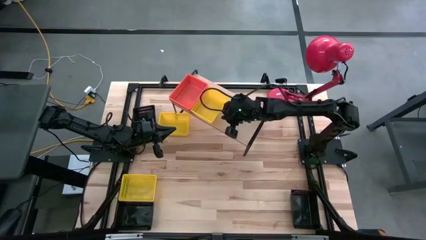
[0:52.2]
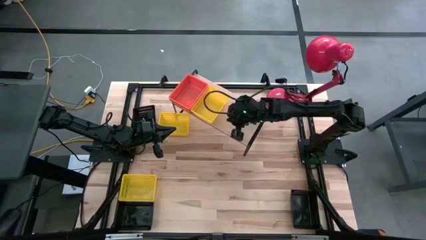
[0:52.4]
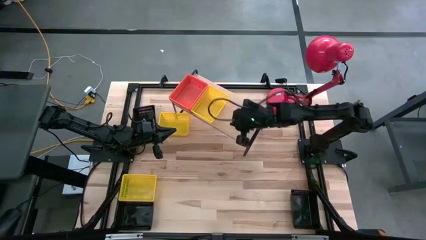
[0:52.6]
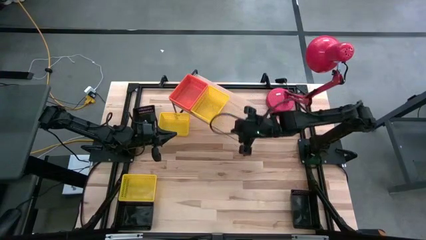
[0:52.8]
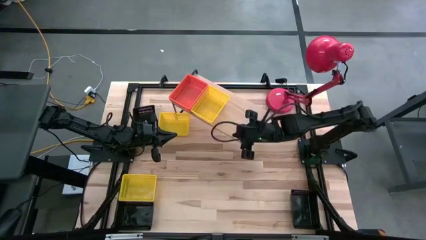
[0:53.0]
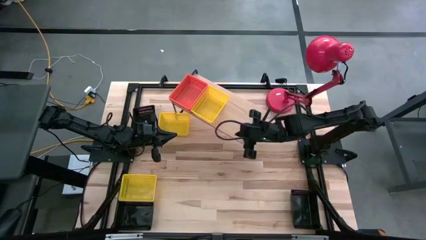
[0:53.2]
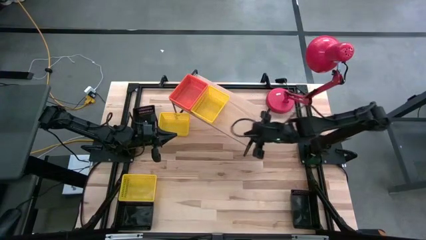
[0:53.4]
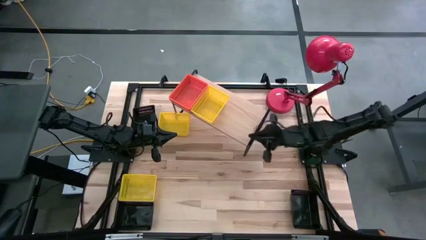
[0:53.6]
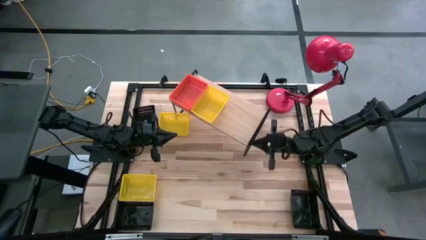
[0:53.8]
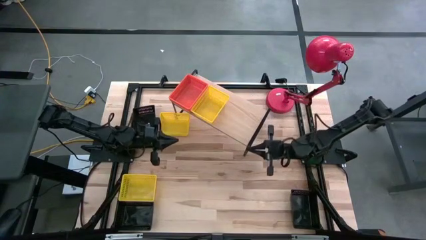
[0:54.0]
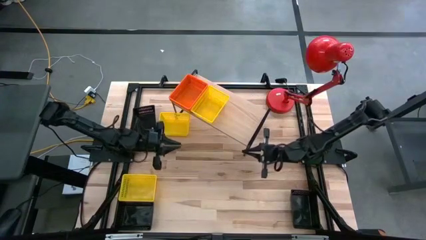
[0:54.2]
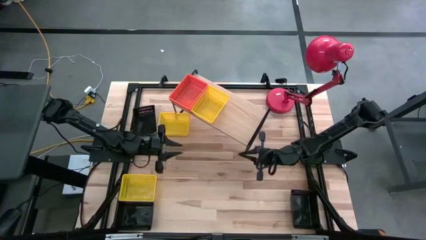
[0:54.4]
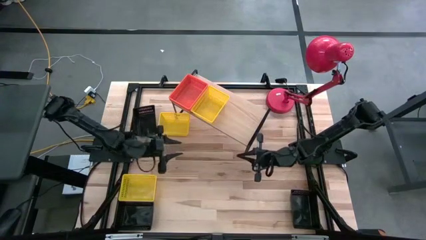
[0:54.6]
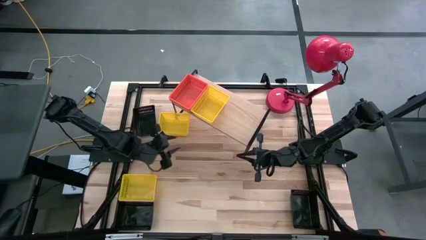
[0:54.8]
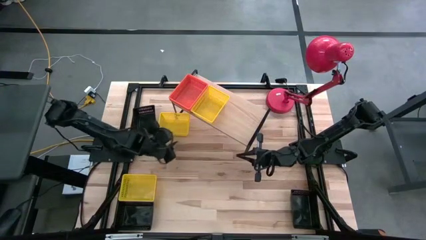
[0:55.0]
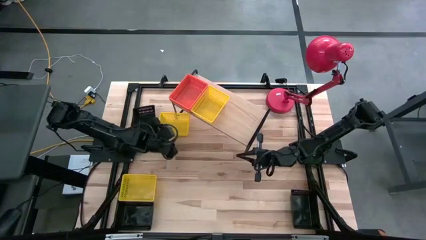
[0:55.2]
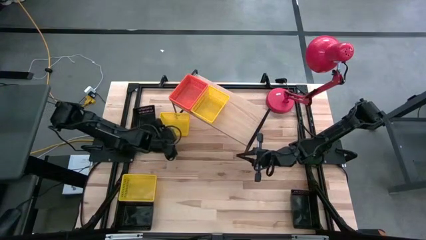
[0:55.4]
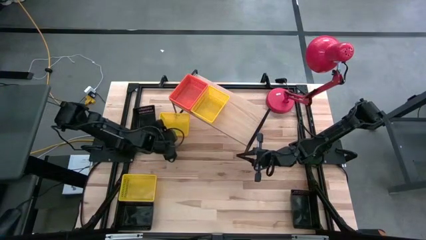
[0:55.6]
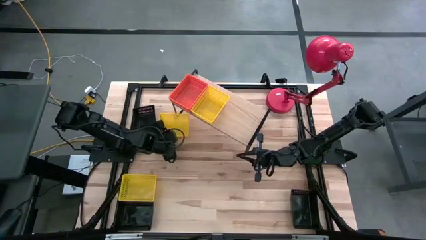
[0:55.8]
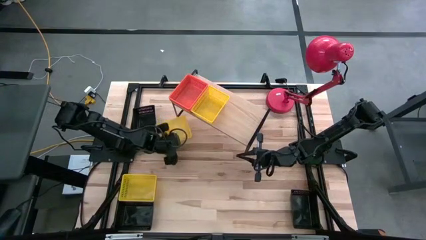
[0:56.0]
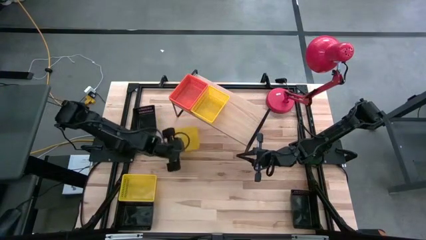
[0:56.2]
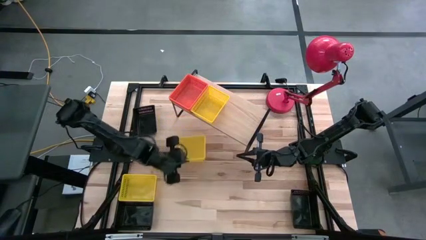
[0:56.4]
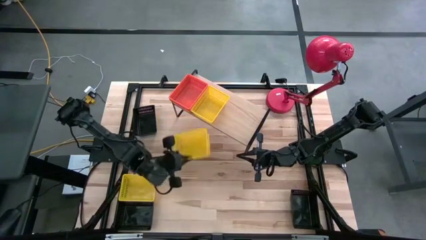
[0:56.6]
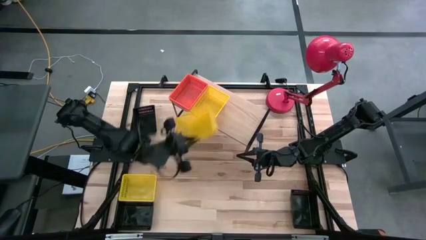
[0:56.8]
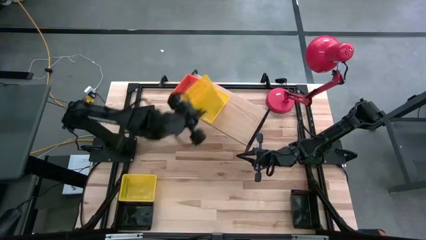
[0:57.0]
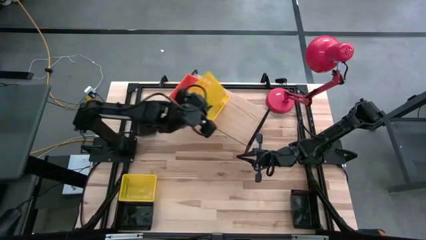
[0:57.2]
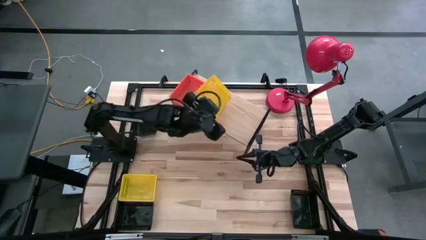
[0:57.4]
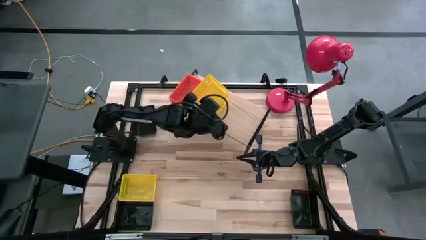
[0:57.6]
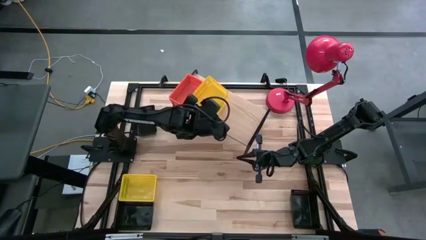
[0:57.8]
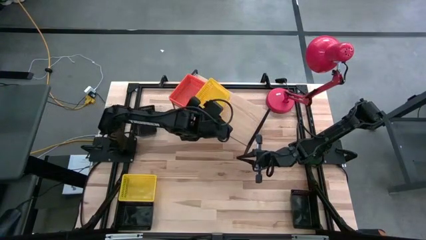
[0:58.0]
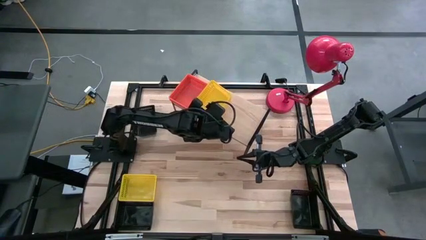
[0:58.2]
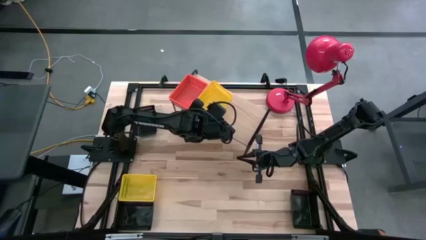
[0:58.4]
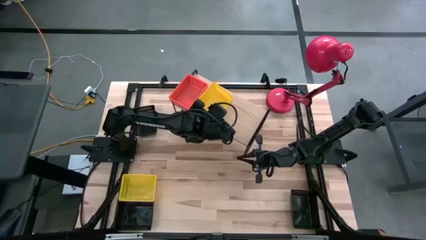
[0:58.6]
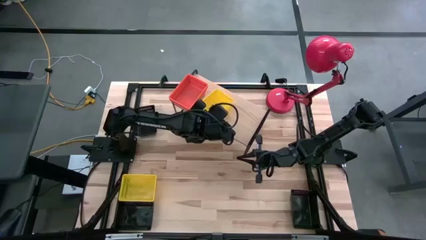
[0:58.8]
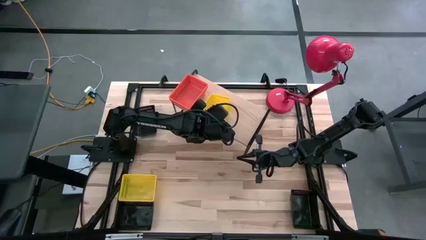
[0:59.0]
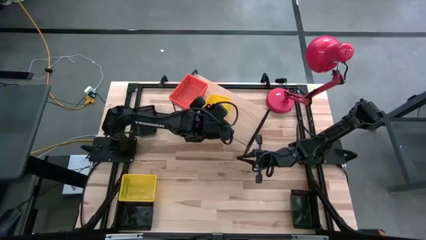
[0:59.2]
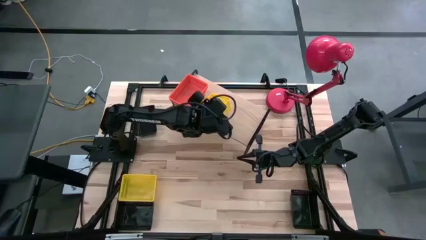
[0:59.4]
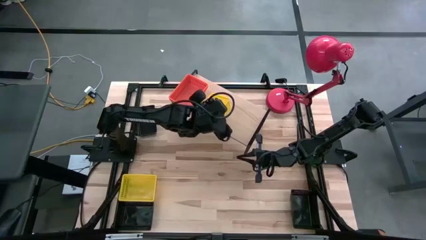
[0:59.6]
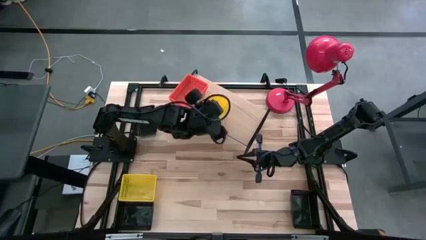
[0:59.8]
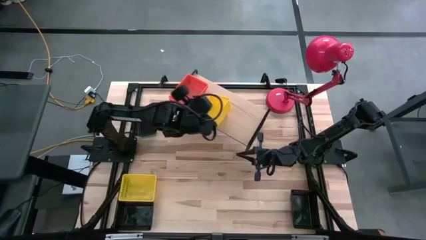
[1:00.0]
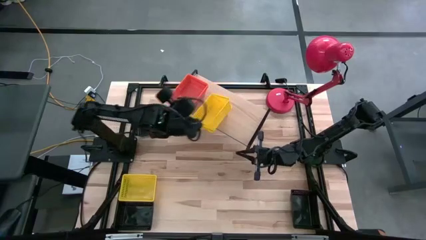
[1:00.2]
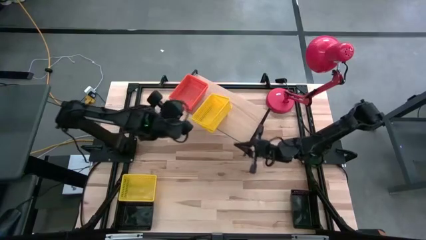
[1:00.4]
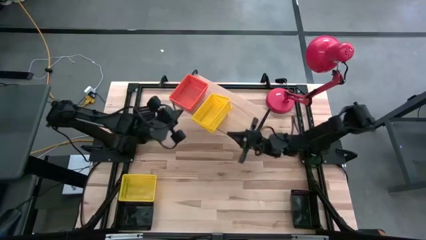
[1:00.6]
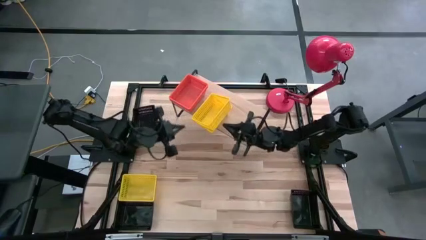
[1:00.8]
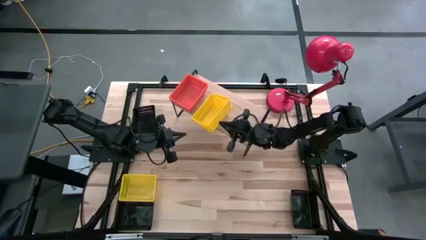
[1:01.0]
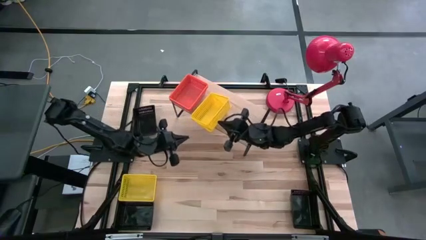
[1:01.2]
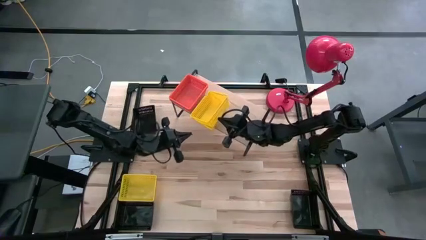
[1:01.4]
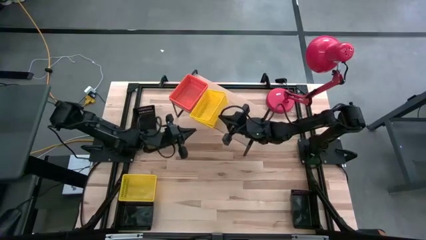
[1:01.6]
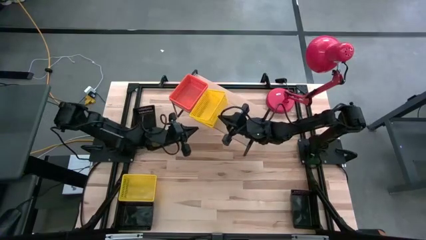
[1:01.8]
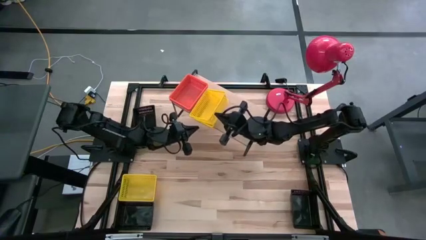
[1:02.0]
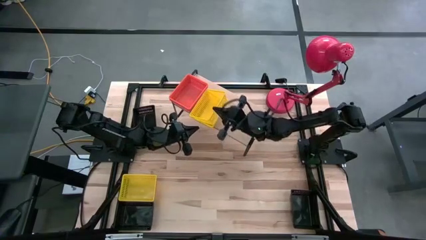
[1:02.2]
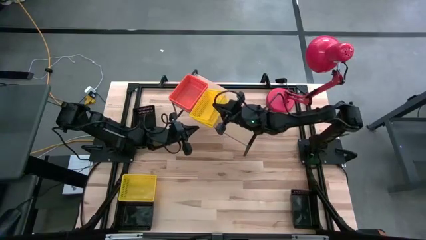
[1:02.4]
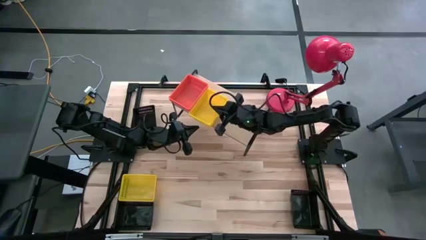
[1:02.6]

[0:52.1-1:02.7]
Task: Stack baskets on shelf by color
Stack the top yellow bin on top of the yellow bin on the shelf

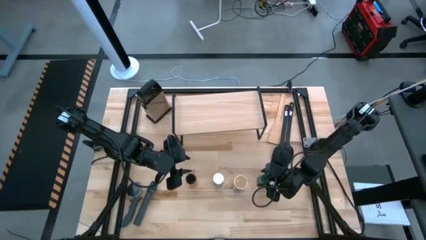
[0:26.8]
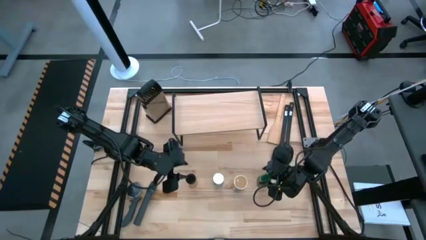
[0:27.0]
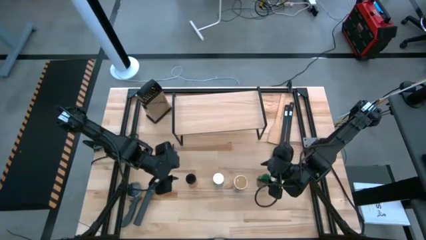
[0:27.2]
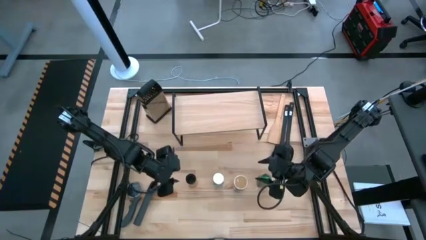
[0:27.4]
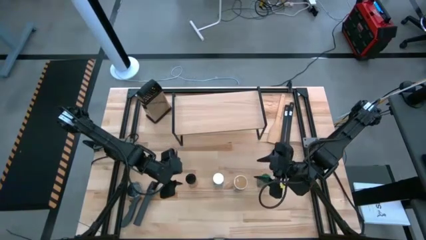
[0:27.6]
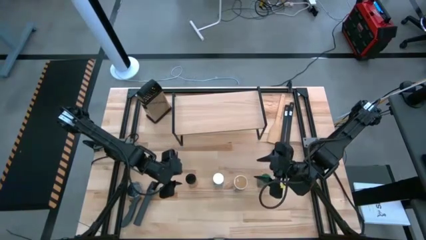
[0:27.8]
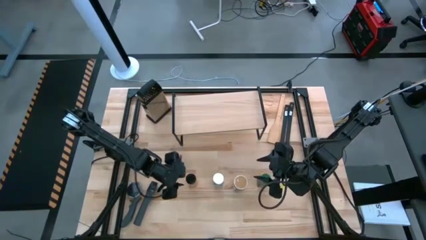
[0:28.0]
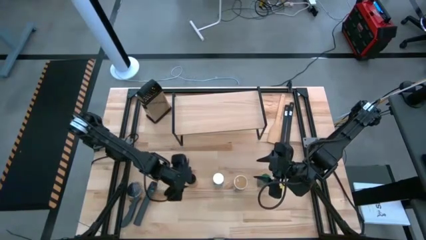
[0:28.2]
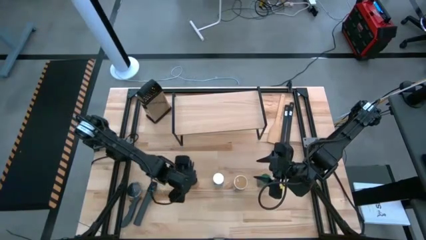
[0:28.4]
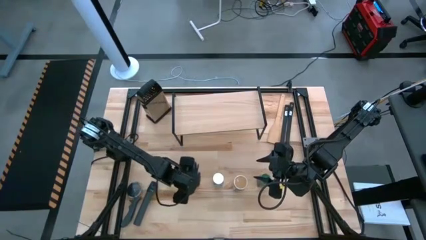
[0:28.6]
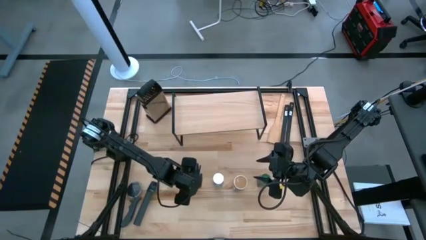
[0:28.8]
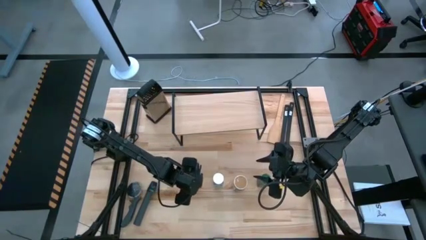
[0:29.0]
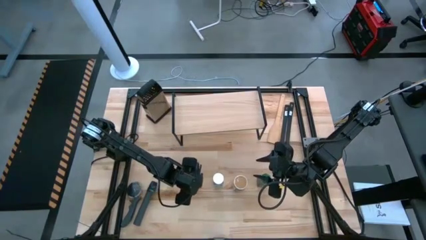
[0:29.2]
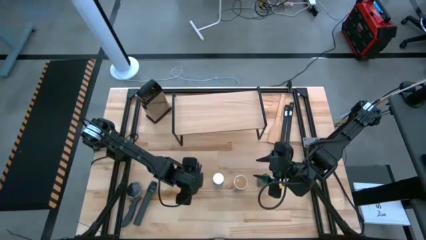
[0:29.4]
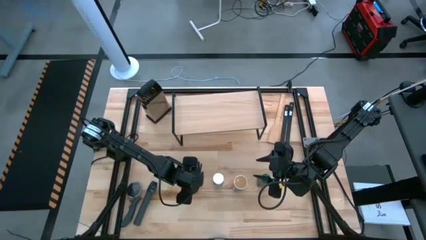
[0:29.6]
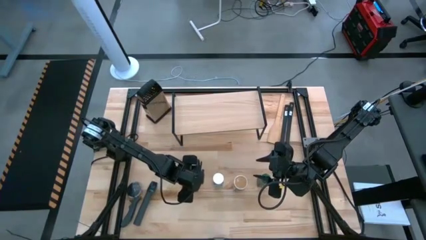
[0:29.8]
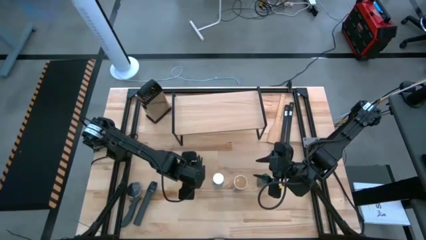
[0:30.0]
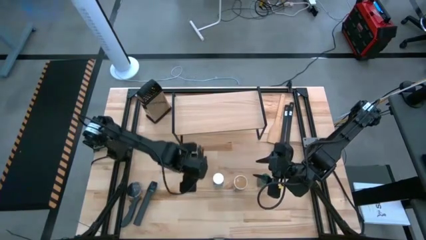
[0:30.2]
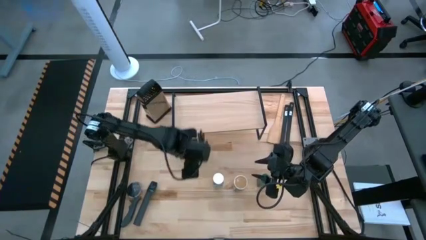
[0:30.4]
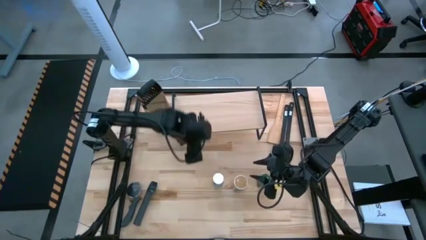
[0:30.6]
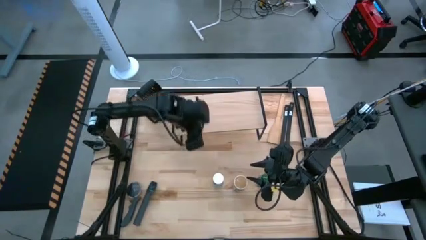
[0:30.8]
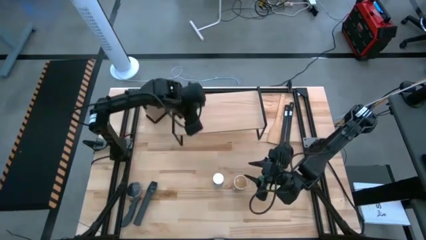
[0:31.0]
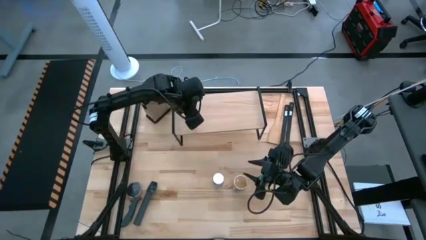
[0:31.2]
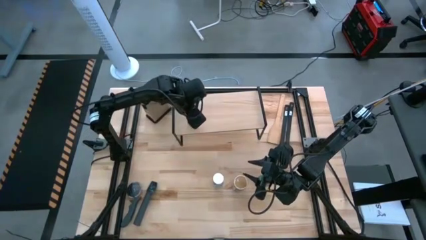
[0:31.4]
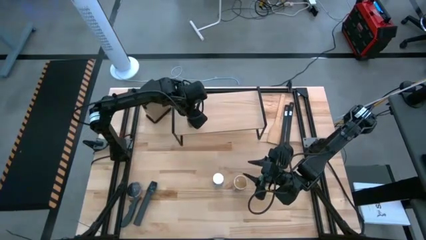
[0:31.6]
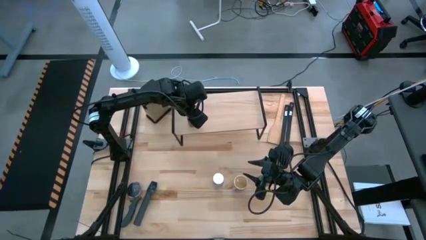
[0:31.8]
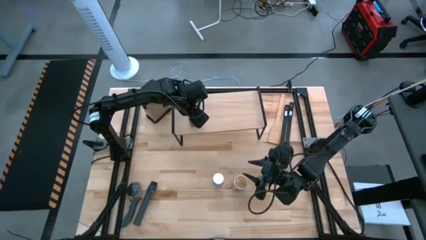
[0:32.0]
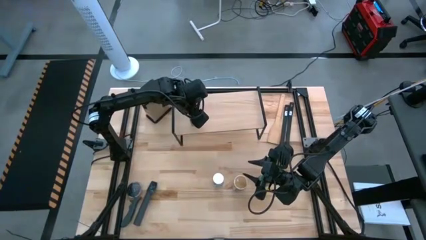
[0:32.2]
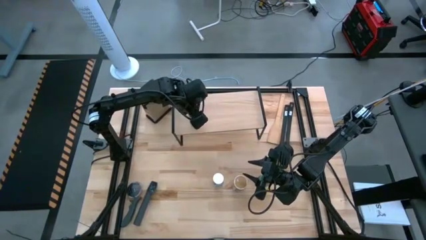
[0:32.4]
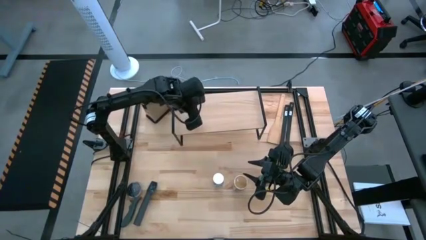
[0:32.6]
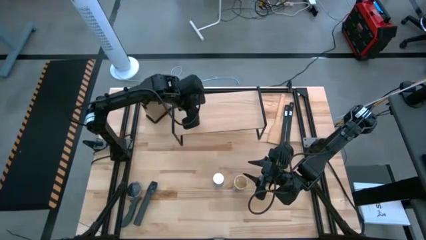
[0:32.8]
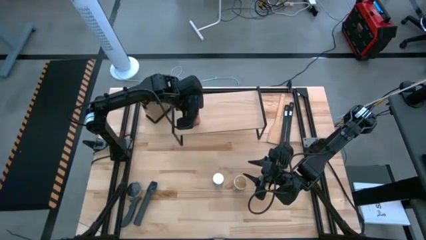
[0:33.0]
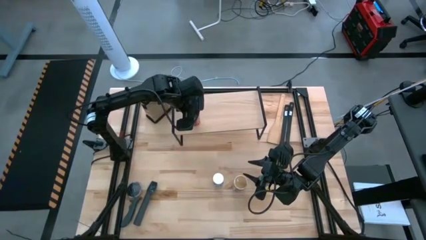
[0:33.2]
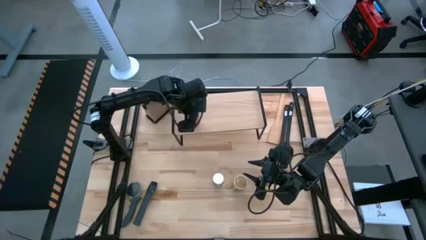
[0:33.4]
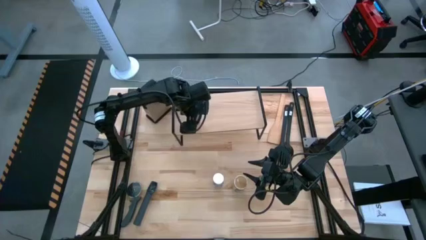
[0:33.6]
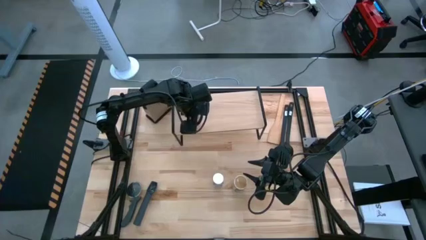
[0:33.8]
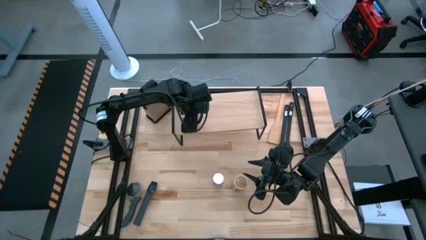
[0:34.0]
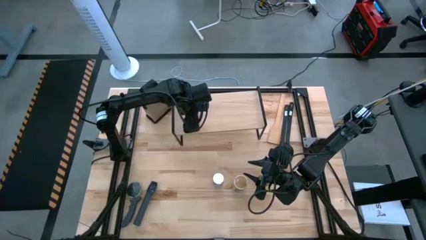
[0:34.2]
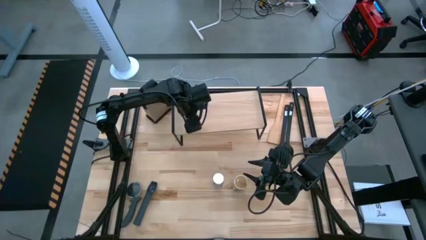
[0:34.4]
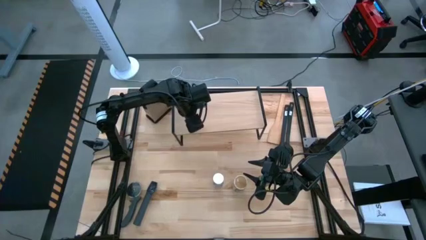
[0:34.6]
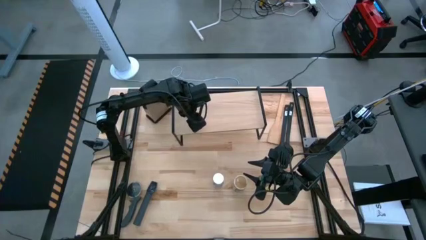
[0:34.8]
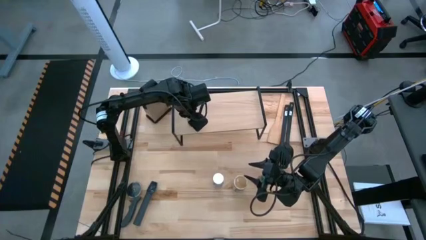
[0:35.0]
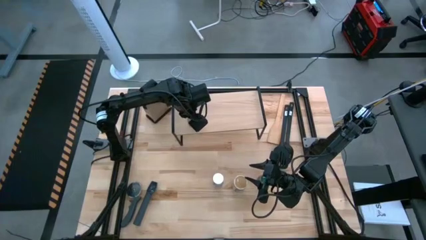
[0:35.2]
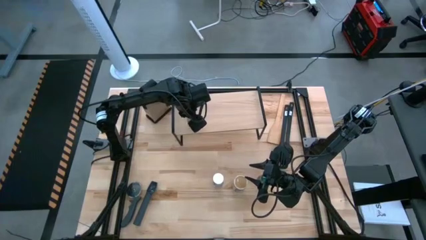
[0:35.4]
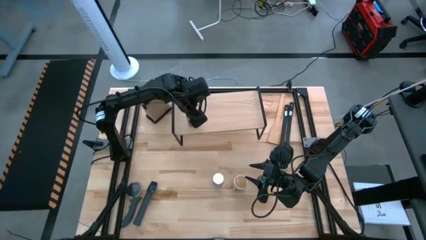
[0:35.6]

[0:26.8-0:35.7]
Task: Shelf spices
Put the black seasoning bottle on the shelf
